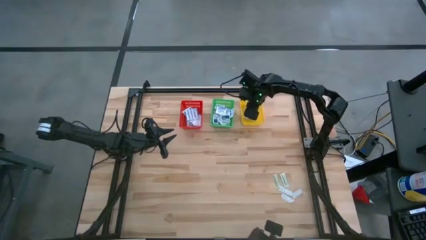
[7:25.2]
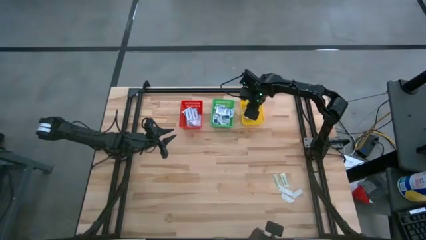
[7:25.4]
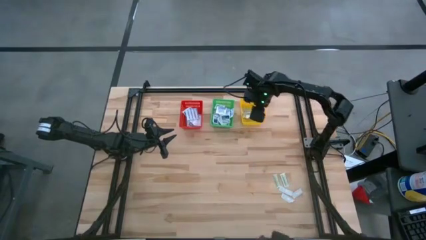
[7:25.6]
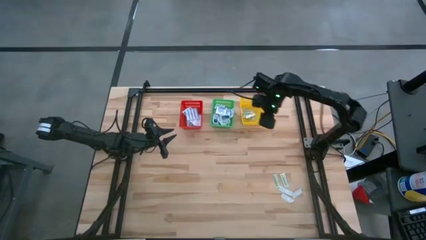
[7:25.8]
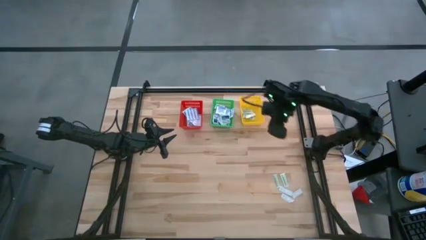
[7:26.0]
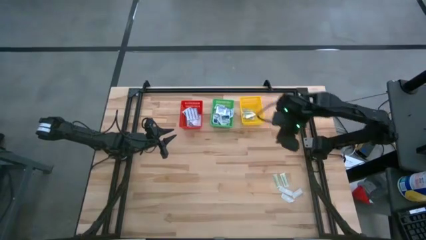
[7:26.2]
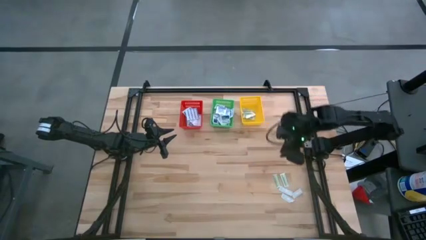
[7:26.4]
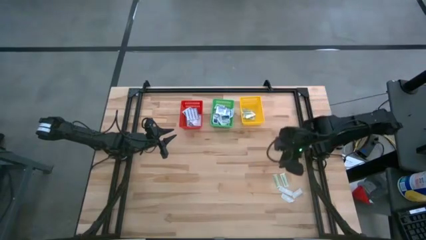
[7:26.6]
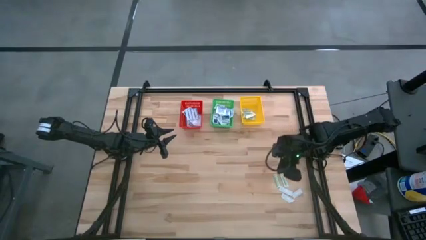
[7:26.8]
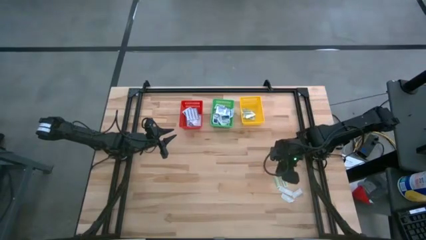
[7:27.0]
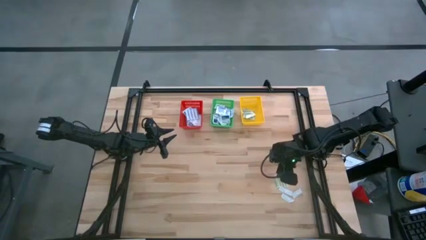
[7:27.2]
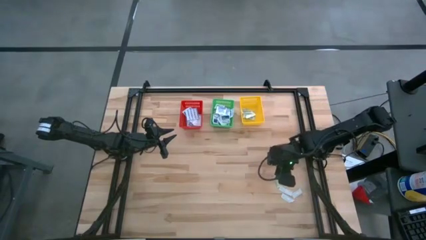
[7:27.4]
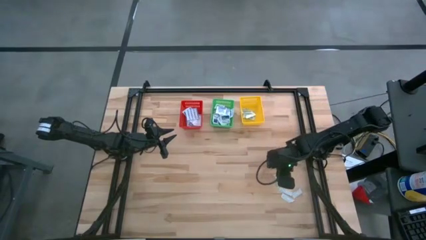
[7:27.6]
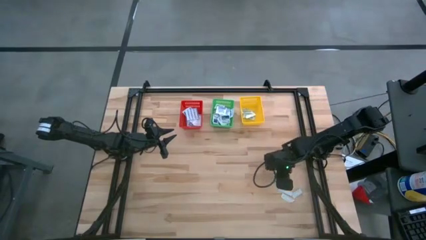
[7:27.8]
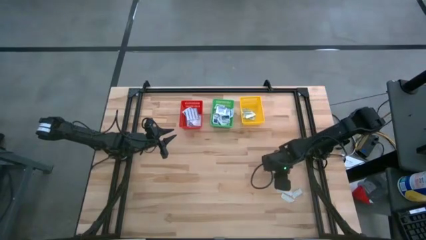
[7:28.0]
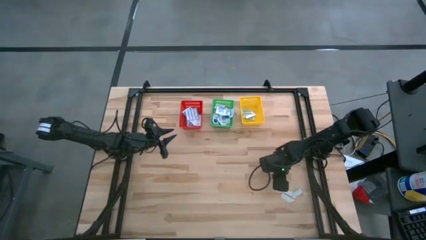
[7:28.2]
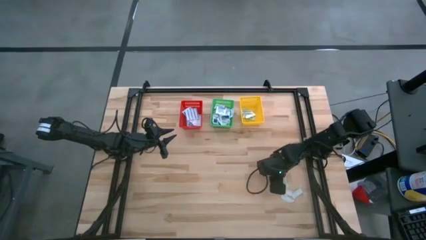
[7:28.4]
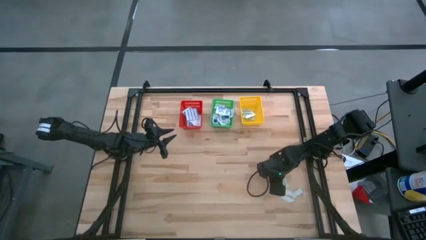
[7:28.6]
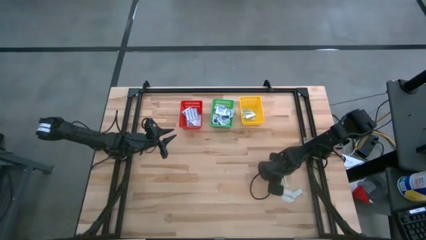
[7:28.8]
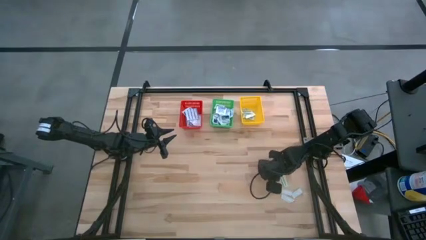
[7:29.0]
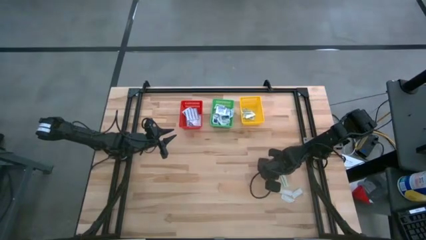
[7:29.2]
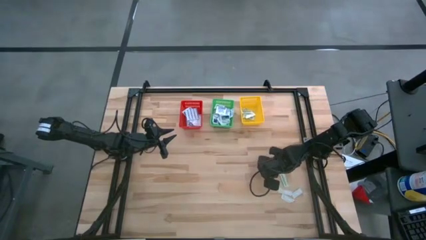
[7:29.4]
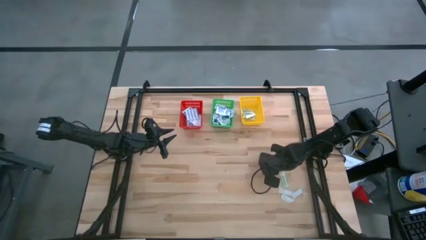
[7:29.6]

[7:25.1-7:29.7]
Task: Pick & Place First Aid Supplies
Put the green bandage into the yellow basket

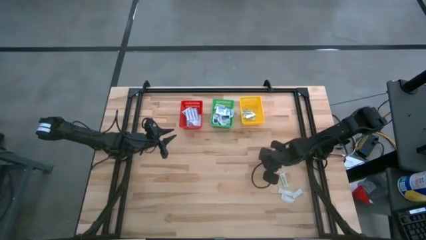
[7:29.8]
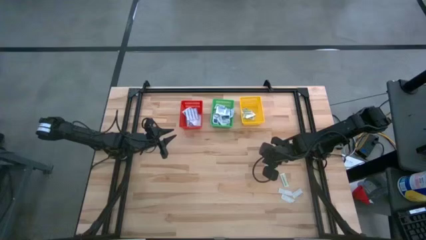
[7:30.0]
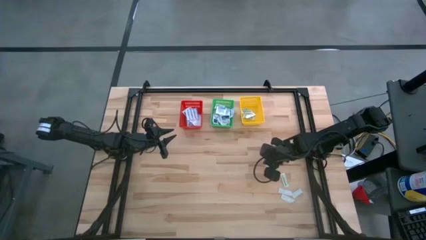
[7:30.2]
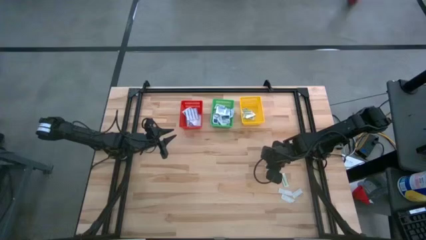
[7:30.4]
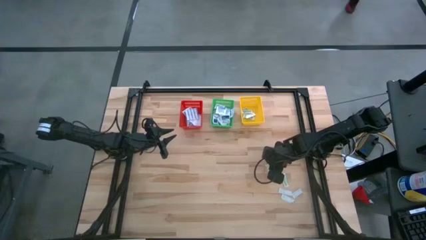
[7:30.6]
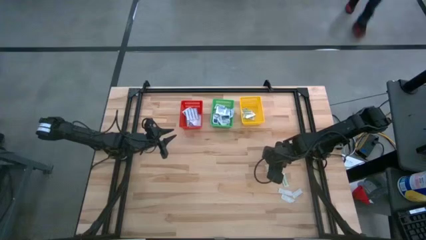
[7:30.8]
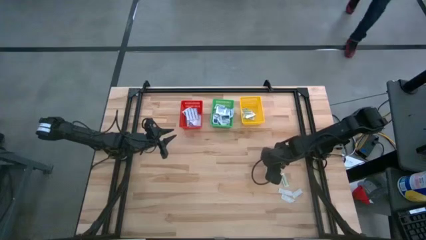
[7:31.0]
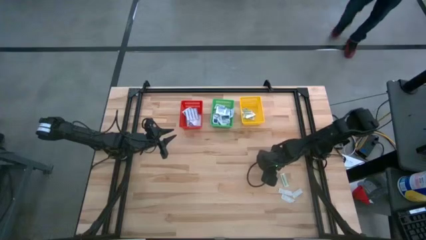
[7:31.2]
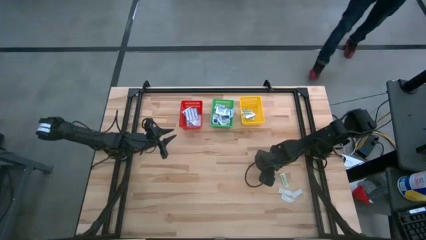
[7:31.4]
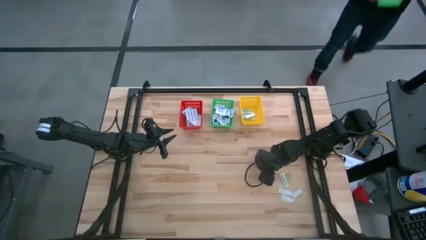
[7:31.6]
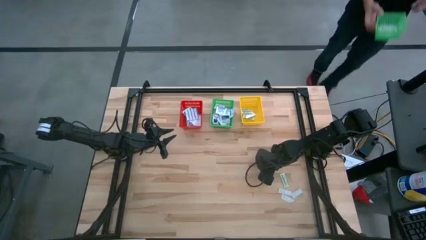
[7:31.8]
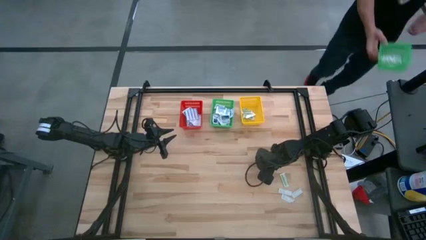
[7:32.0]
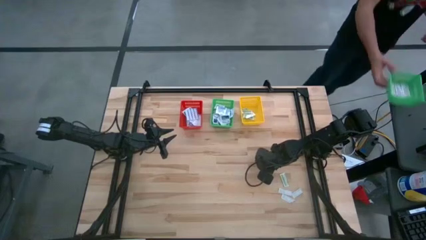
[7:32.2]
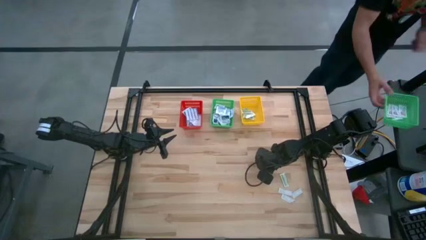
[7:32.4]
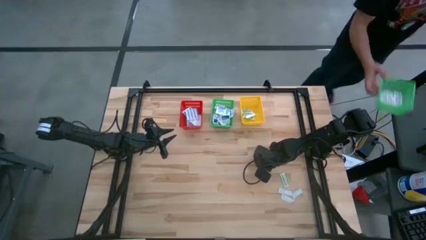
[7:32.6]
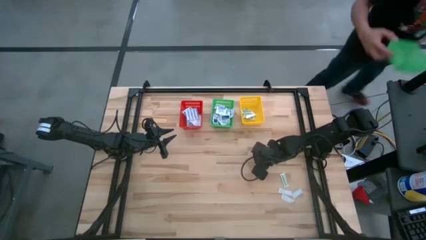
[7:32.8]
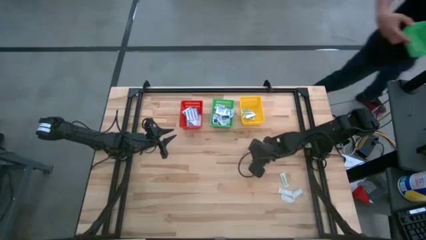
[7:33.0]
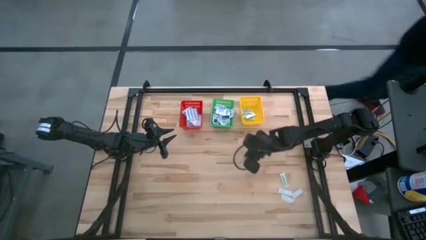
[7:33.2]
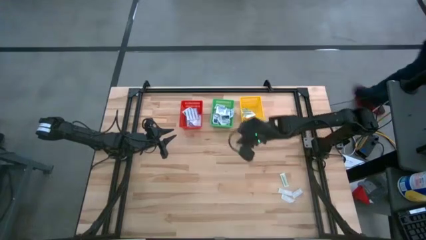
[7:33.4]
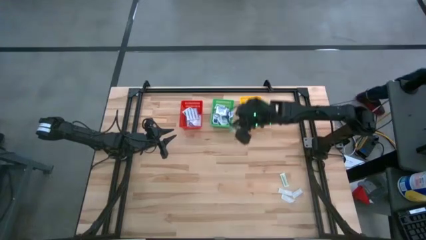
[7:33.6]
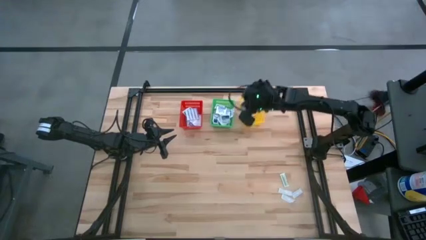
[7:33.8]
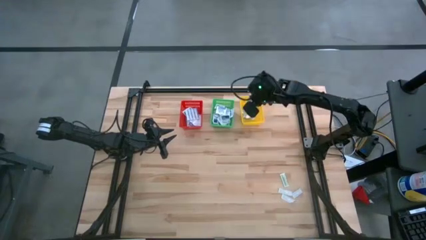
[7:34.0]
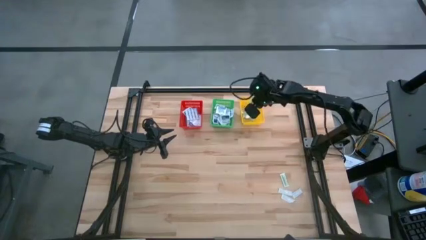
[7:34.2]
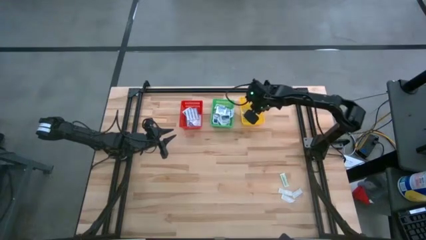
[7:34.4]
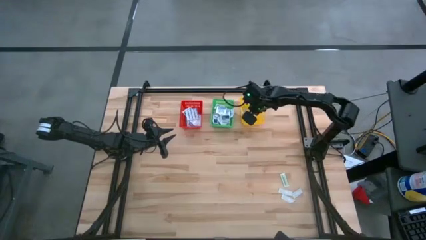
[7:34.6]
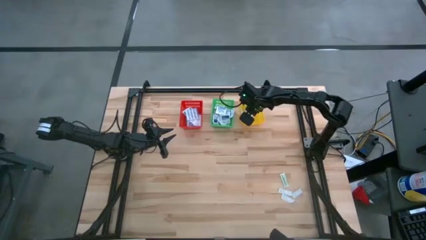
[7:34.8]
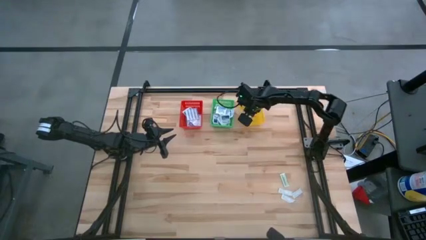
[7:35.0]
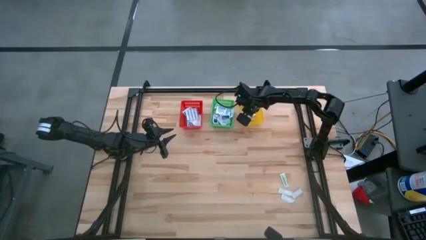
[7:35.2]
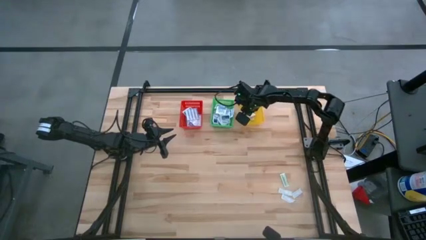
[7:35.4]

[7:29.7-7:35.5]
Put the green bandage into the yellow basket

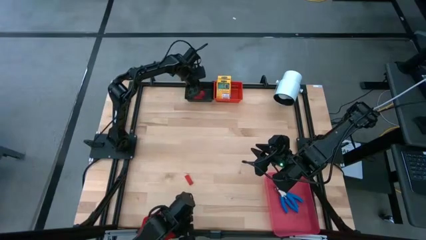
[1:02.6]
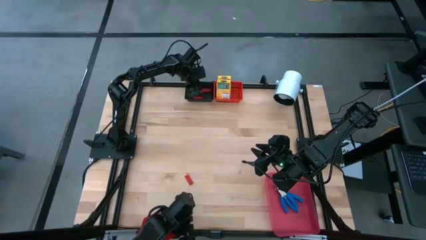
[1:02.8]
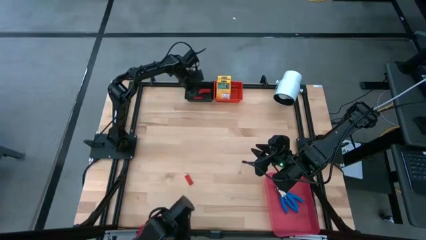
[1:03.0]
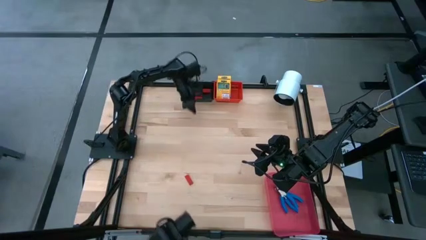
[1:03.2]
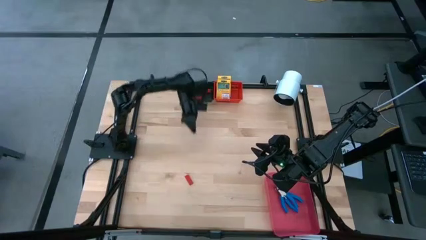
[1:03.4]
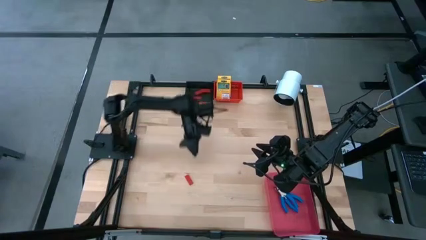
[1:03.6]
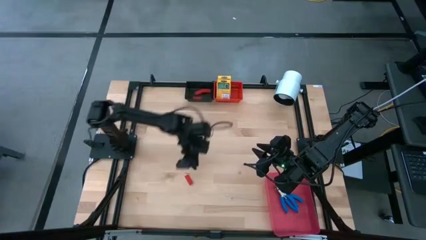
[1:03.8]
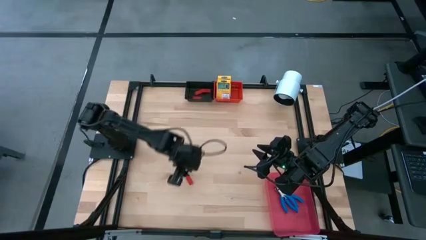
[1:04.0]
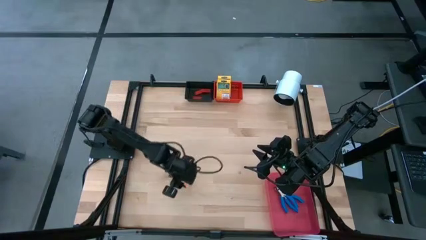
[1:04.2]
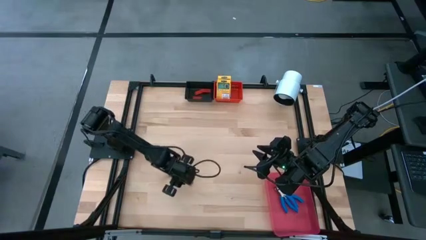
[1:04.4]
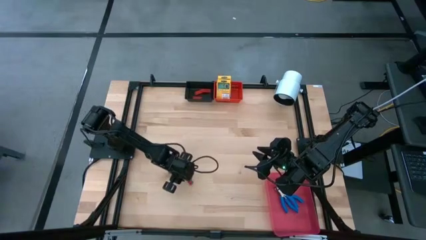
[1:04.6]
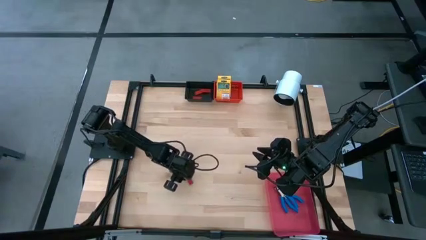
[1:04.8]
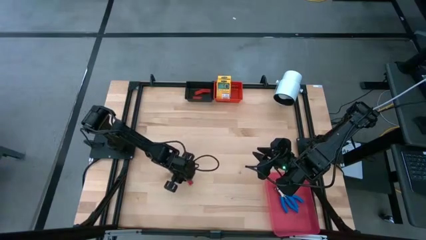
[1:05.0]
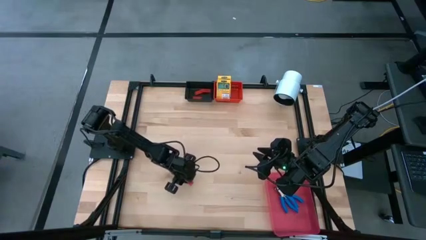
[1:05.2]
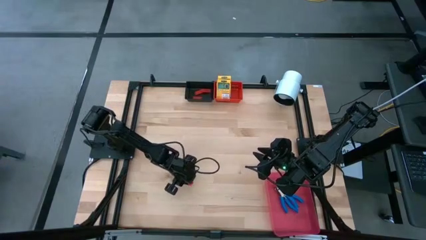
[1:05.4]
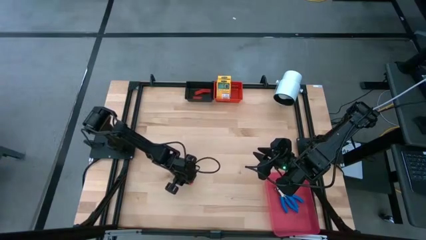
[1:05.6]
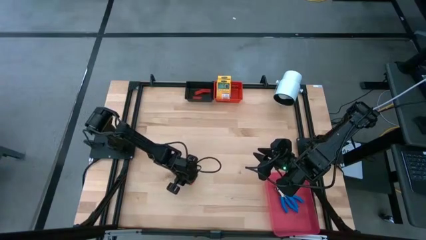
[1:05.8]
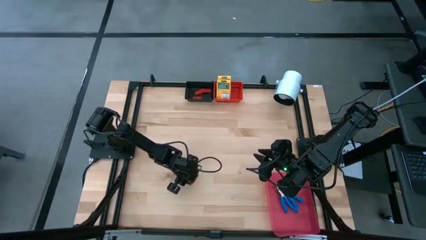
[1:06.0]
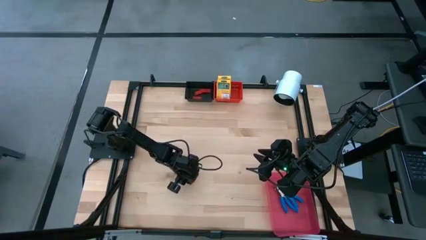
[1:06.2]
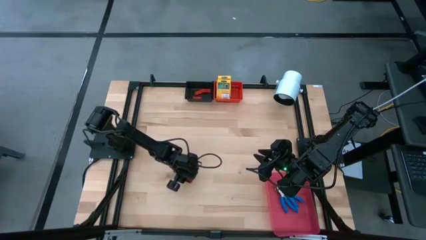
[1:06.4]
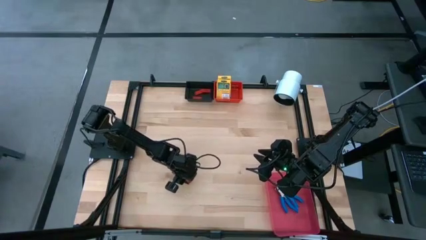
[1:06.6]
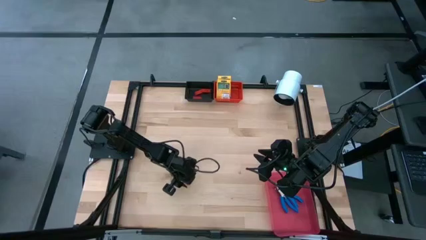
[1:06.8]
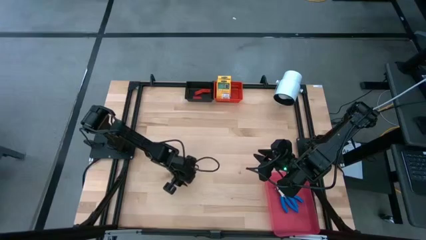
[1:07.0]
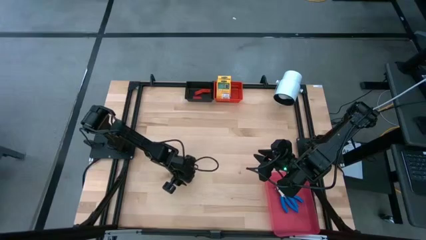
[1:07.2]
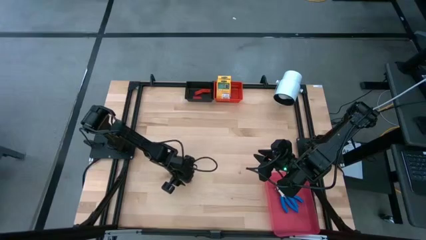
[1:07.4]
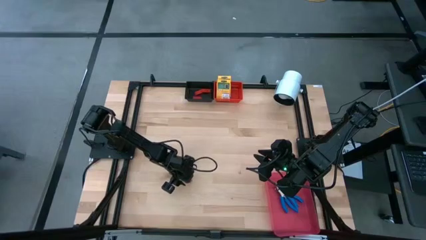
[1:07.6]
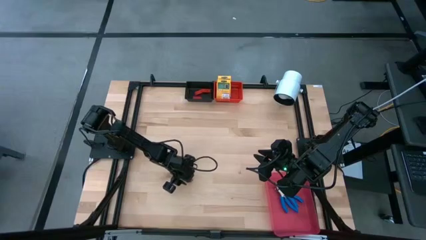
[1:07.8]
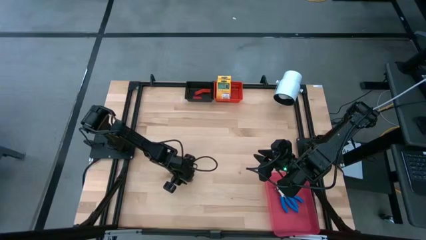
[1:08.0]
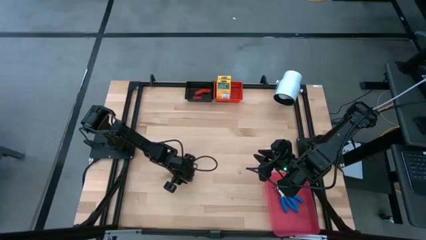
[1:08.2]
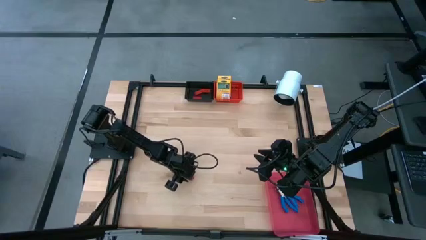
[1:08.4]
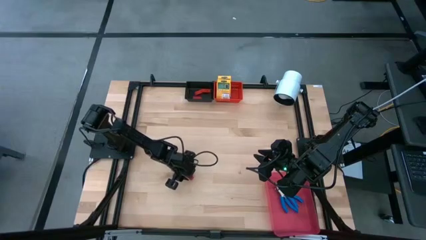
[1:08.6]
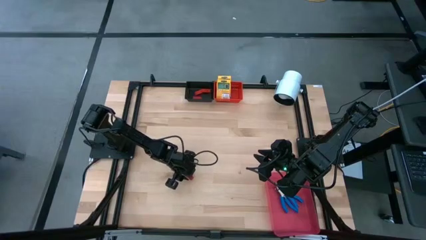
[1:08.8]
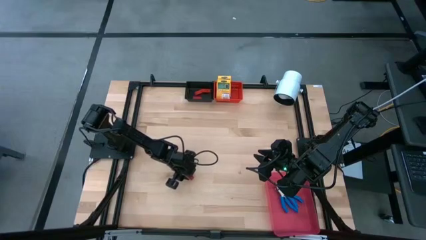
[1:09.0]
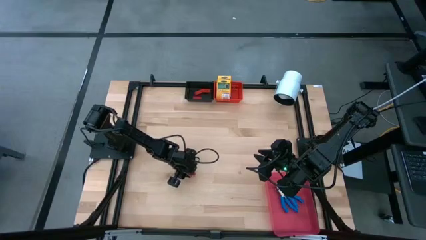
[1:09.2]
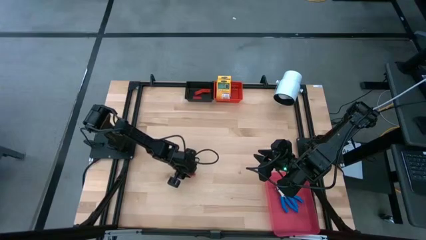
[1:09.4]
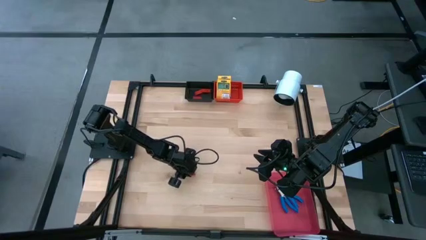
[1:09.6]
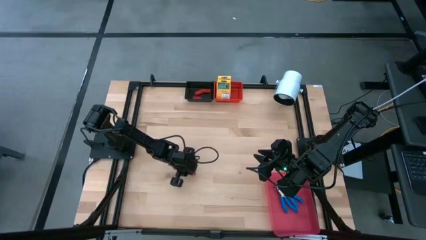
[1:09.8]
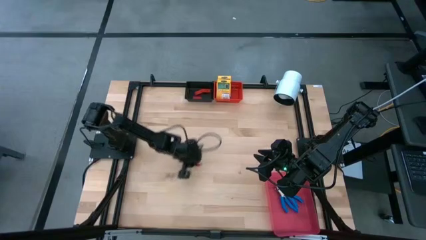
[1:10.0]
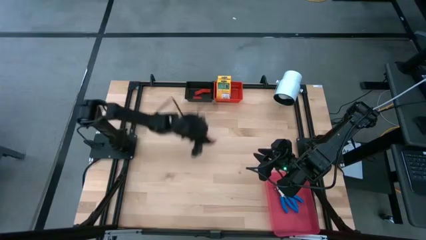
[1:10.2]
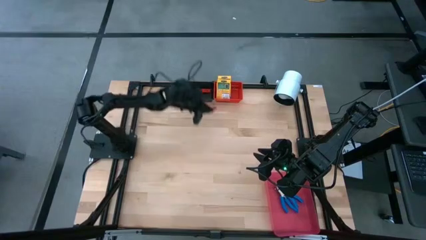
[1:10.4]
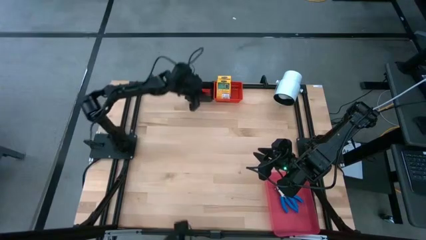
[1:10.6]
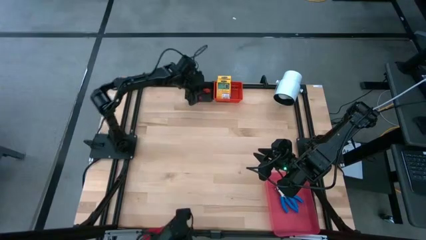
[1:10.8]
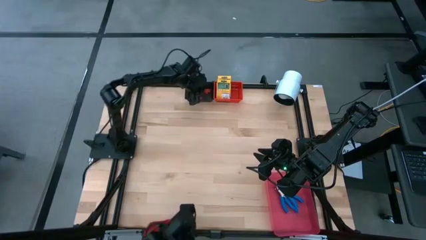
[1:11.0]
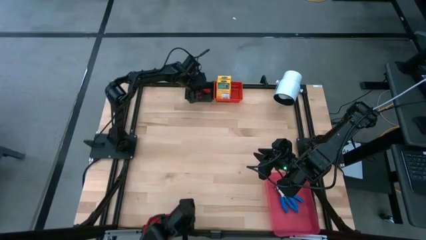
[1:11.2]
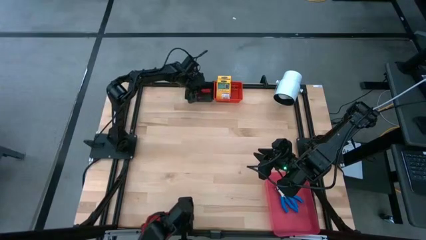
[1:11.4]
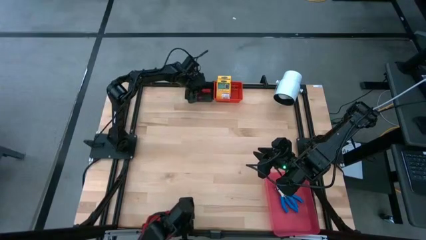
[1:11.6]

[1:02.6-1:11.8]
Task: Pick & Place School Supplies
Put the red eraser into the black bin
